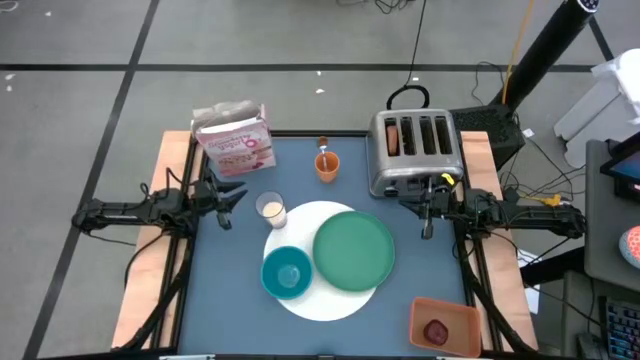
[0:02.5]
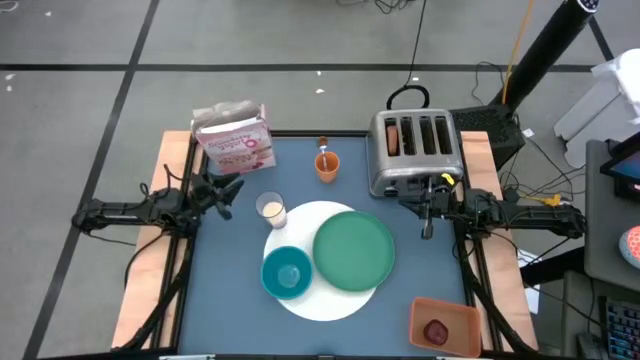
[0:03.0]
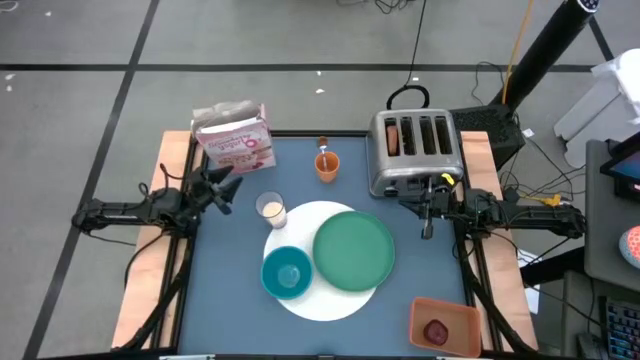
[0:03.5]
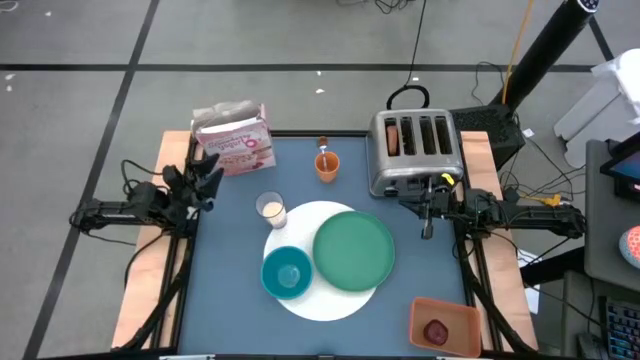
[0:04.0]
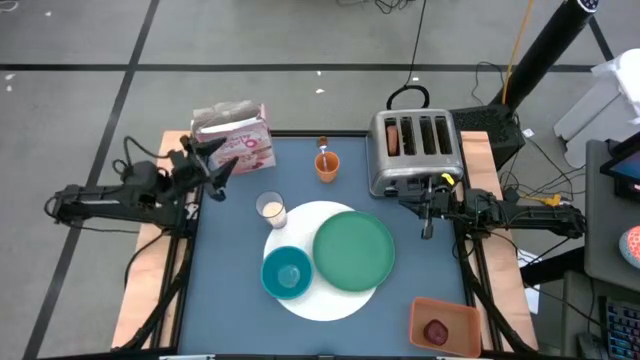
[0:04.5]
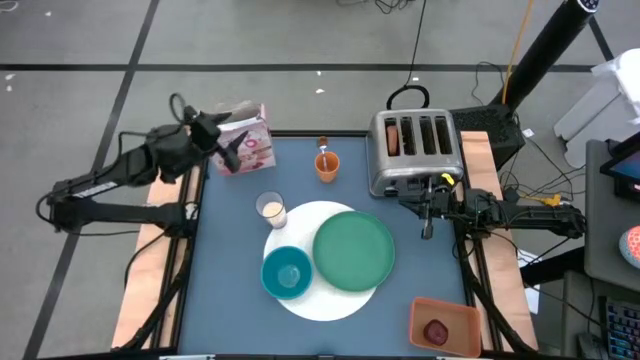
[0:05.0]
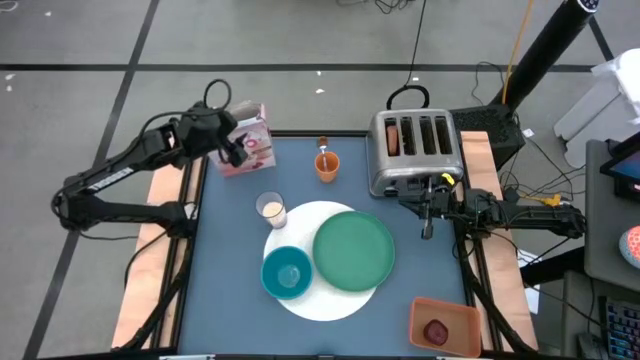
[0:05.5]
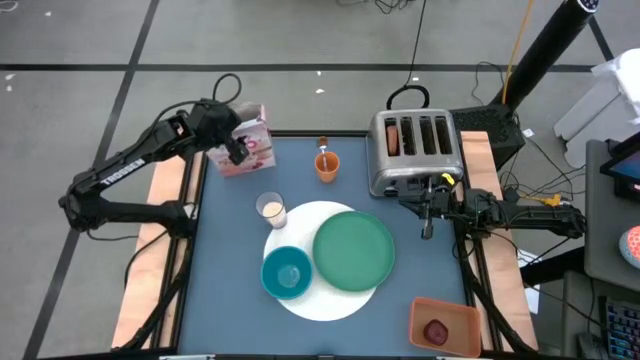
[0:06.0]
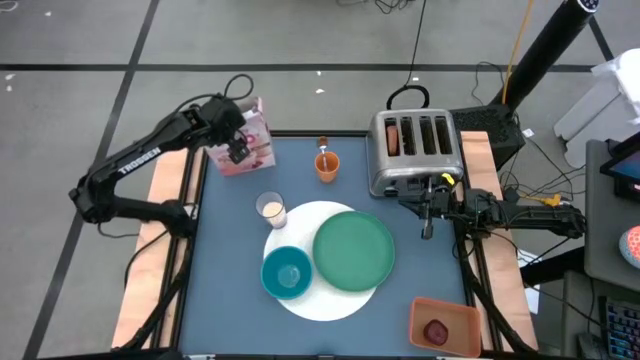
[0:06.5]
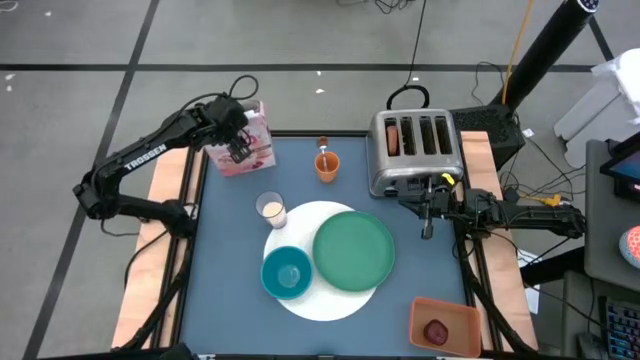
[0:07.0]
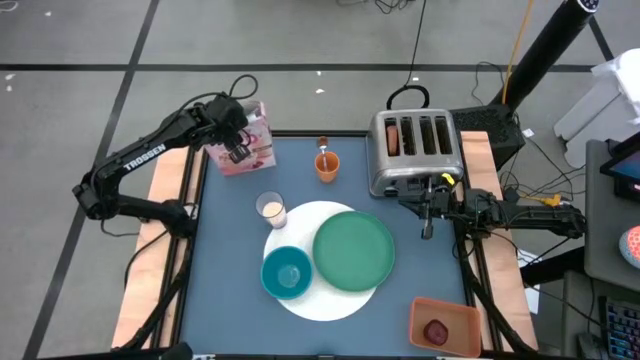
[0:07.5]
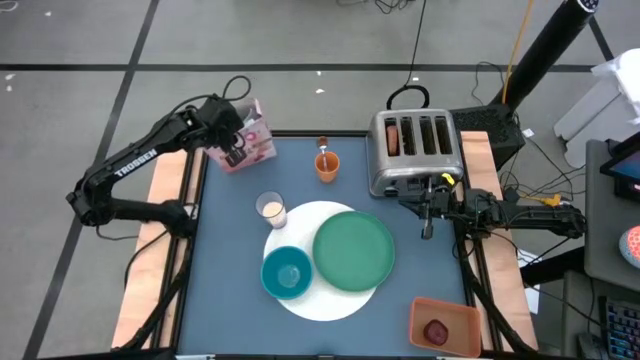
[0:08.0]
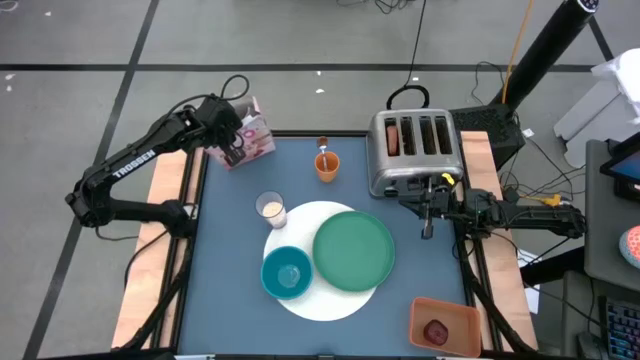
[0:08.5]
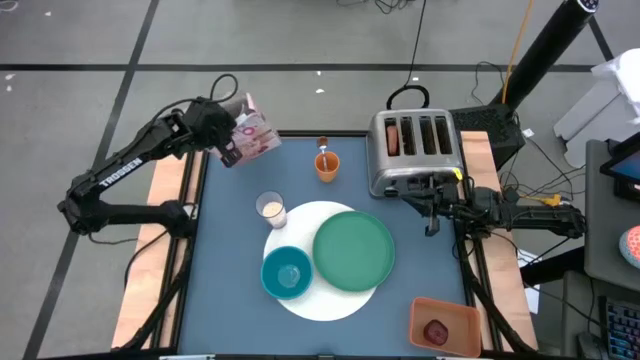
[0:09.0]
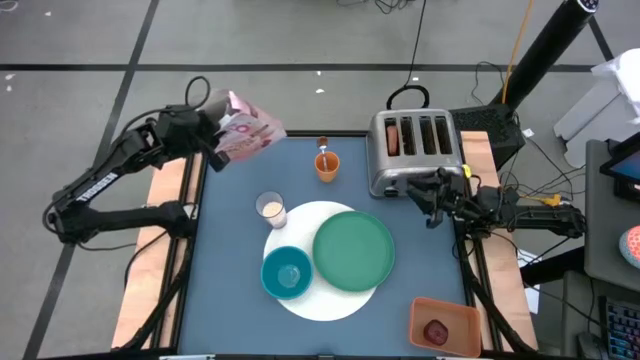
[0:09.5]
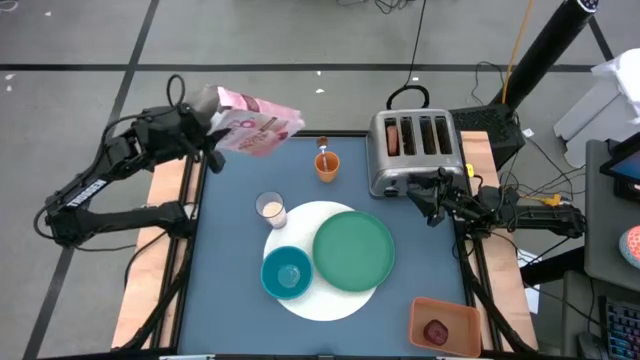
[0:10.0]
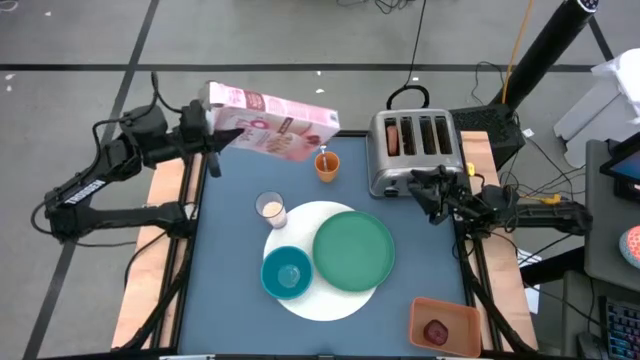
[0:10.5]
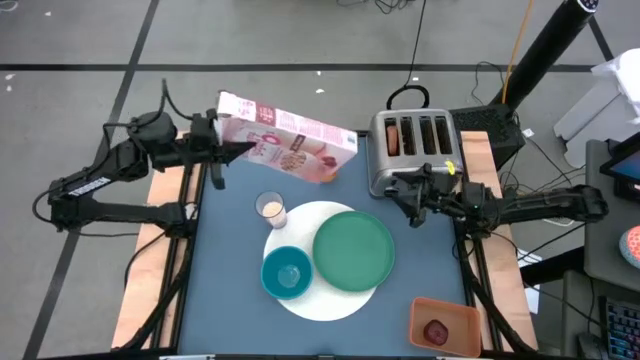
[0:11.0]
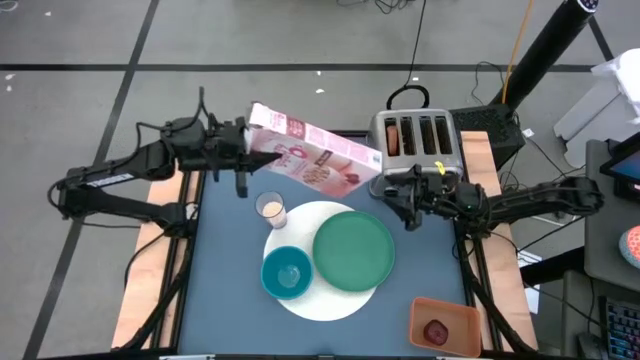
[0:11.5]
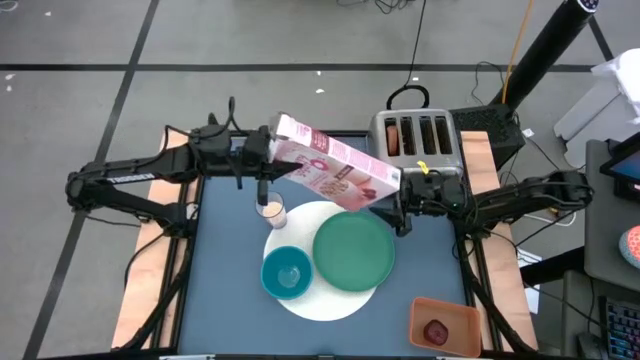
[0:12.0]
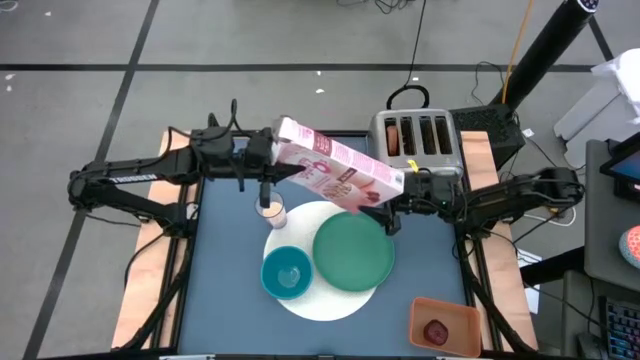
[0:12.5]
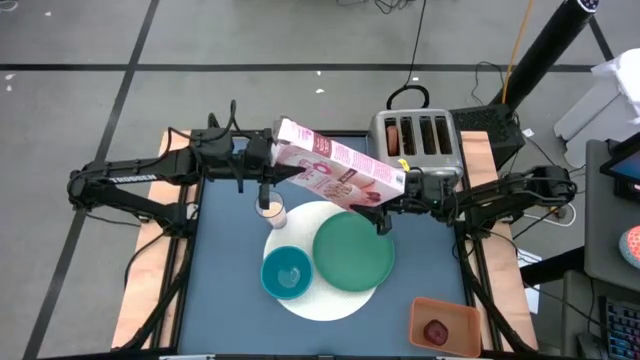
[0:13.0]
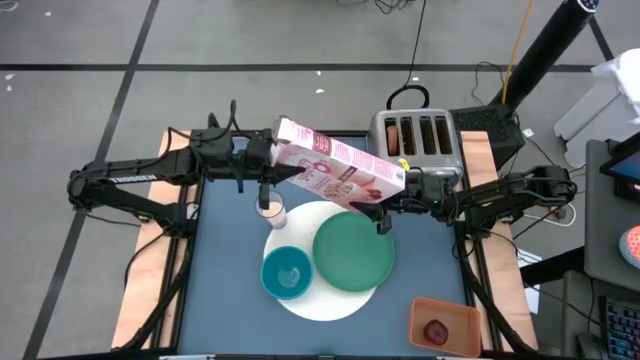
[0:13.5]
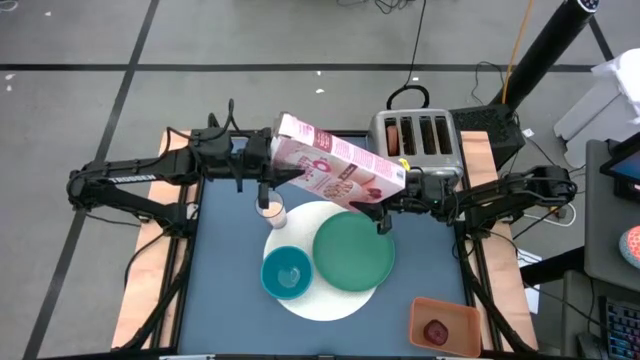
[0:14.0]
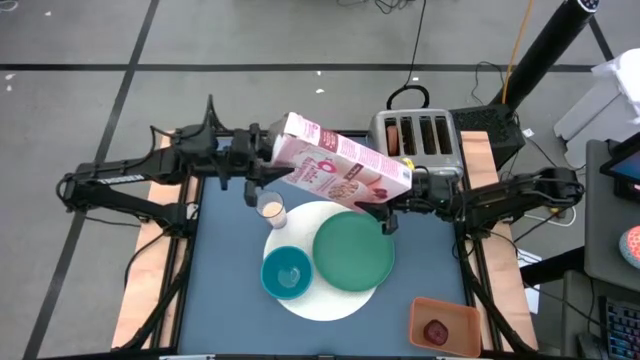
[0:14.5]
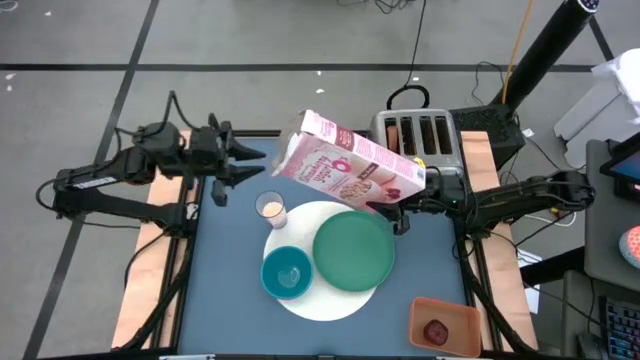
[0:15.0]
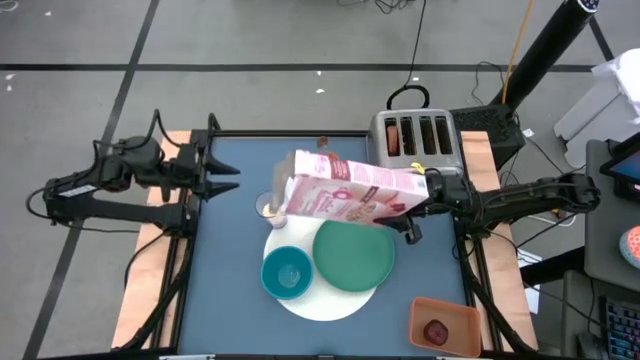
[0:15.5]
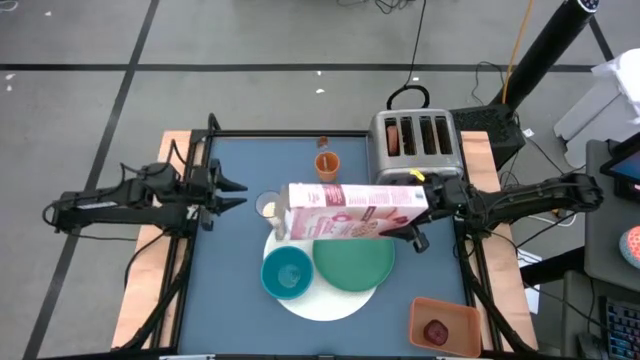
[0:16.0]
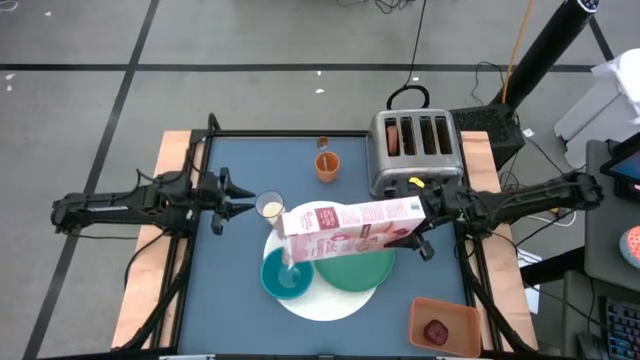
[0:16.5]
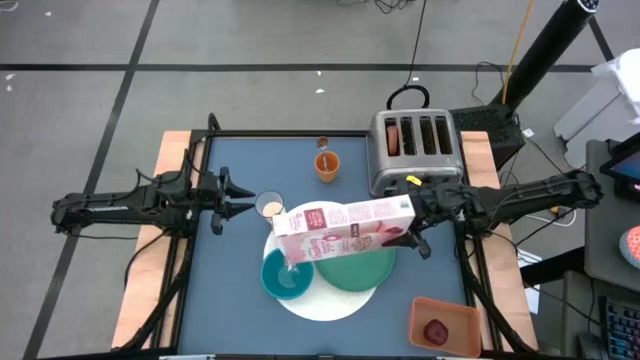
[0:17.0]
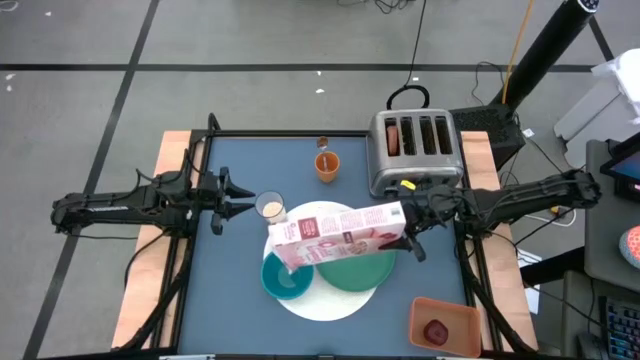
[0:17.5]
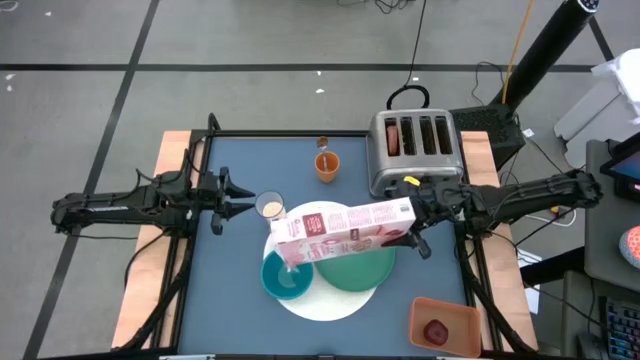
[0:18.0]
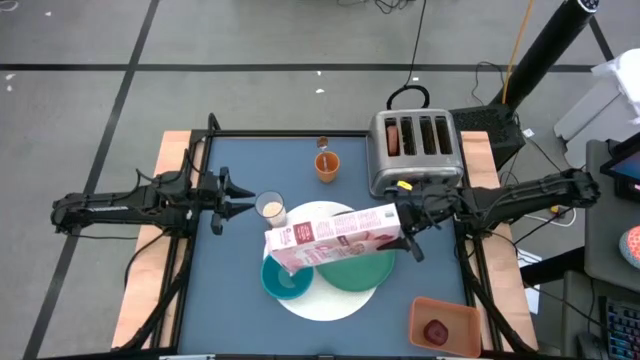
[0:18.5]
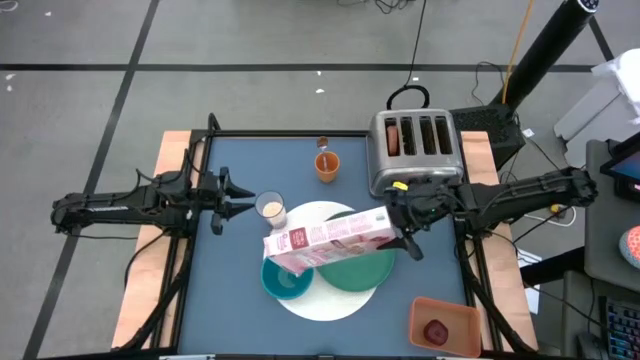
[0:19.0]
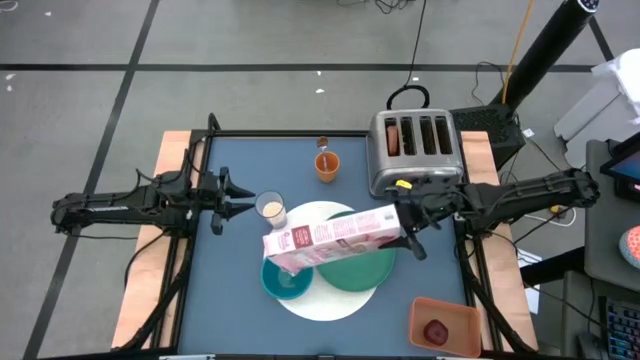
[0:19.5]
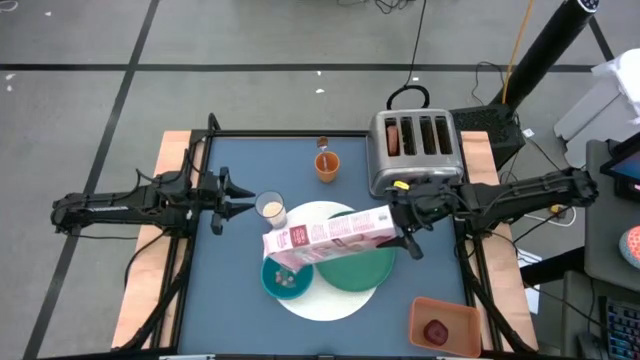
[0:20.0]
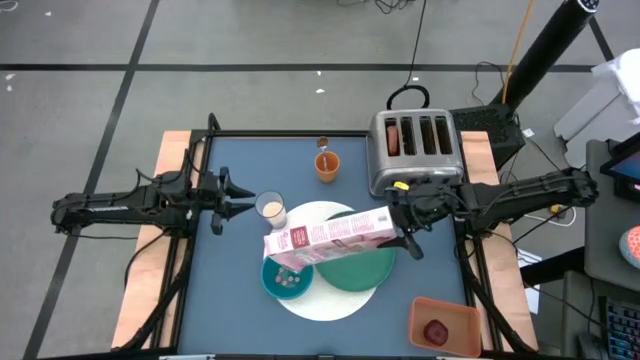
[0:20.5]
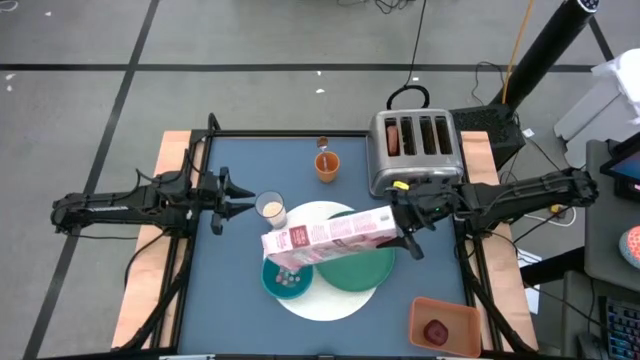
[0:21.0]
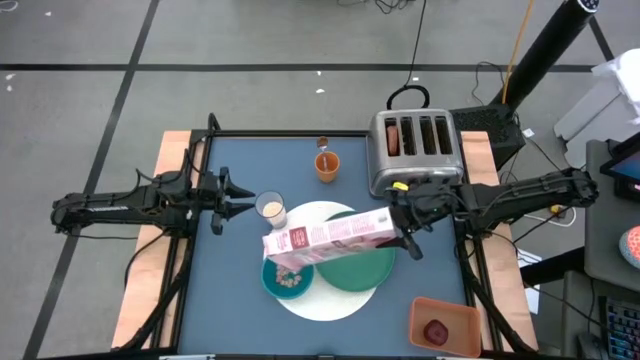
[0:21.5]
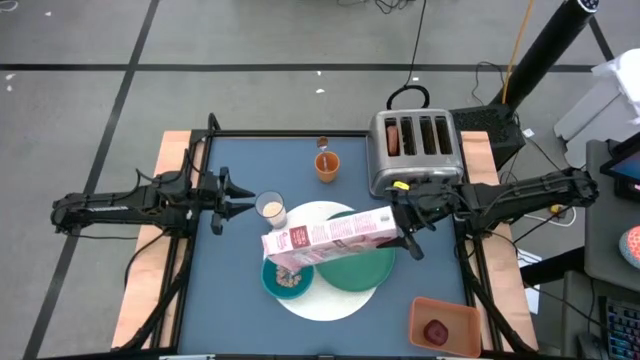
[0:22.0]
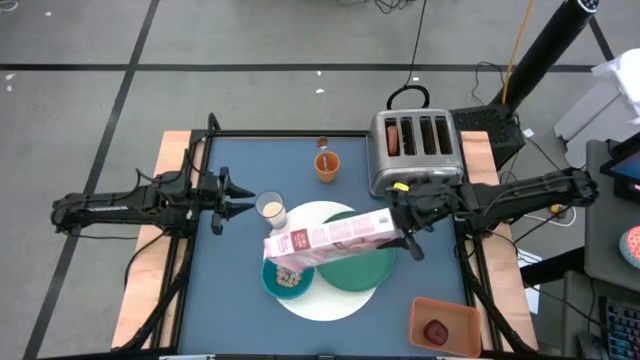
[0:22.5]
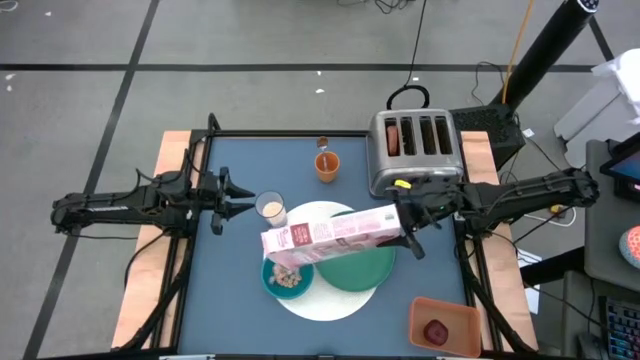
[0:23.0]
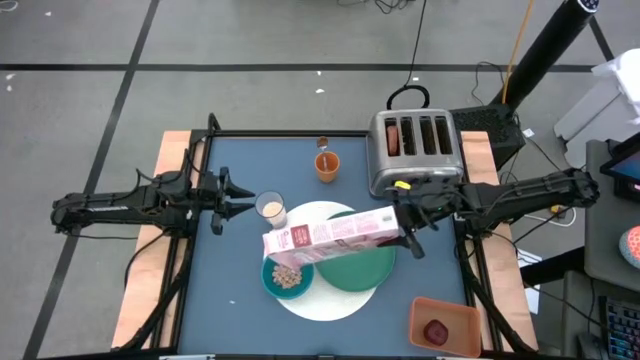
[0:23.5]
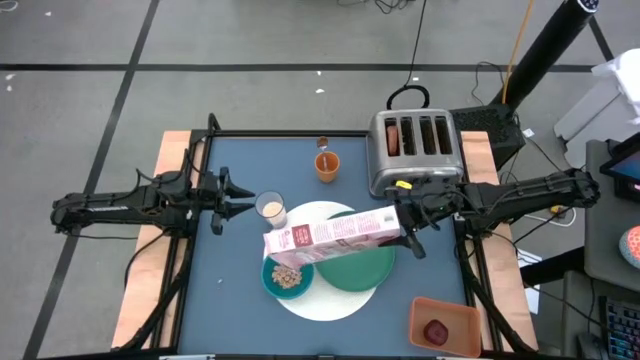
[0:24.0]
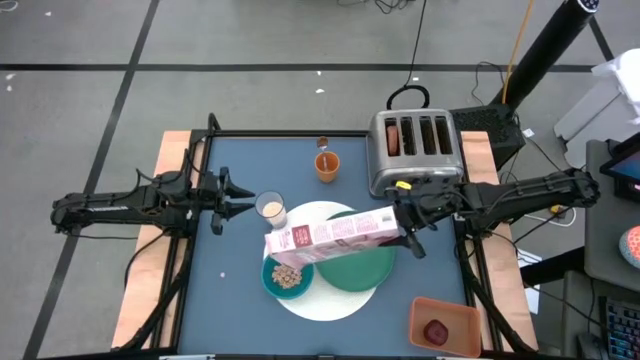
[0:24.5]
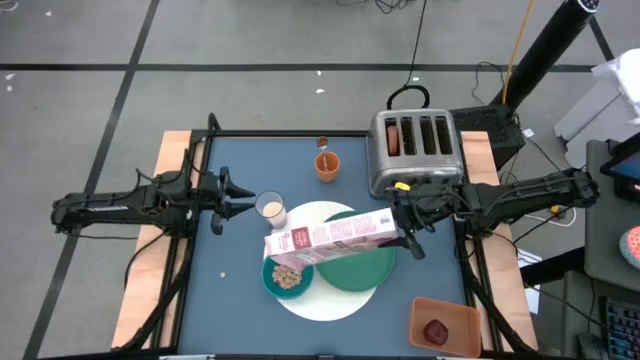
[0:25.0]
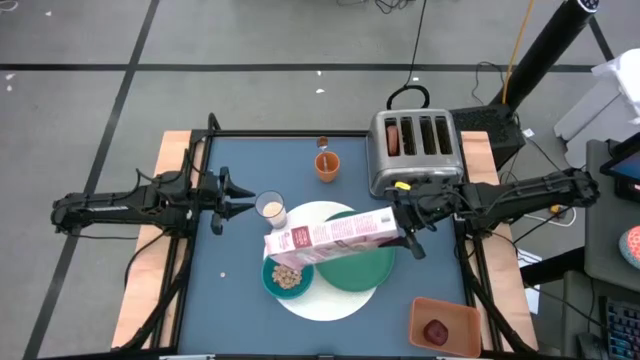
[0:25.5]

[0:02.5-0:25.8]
Task: Arrange a breakfast setting
Pour the cereal from the cereal box into the blue bowl
